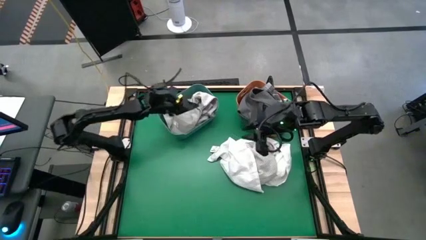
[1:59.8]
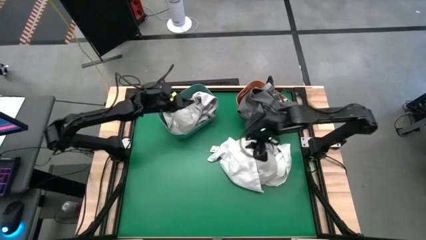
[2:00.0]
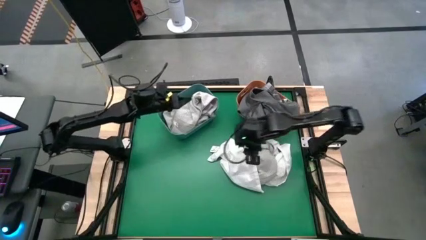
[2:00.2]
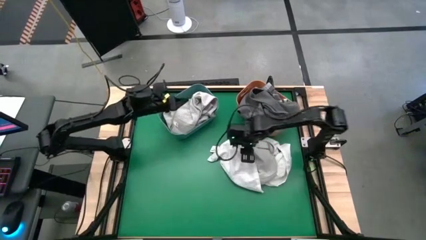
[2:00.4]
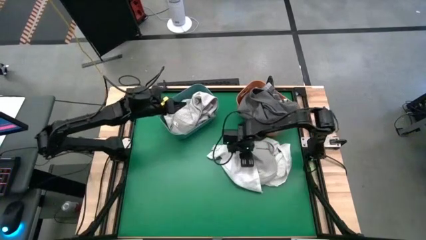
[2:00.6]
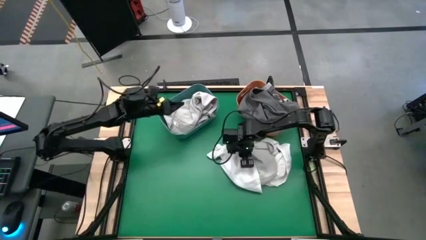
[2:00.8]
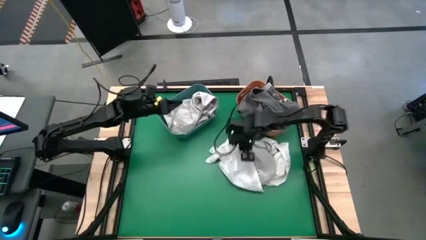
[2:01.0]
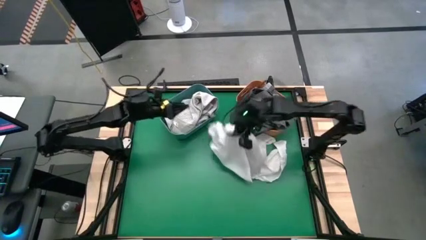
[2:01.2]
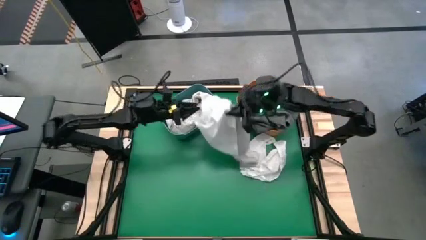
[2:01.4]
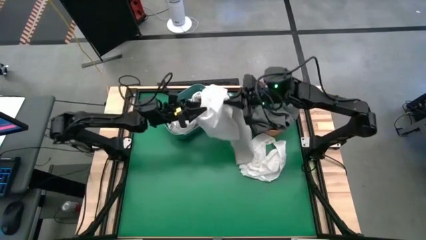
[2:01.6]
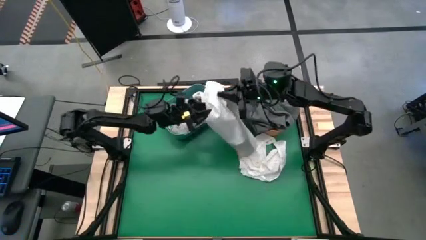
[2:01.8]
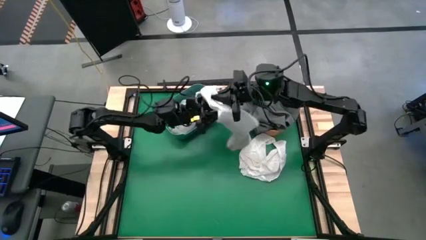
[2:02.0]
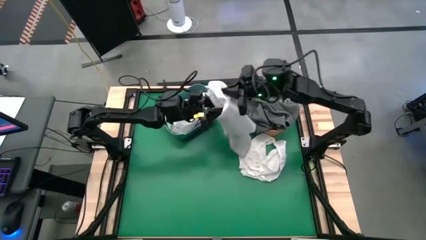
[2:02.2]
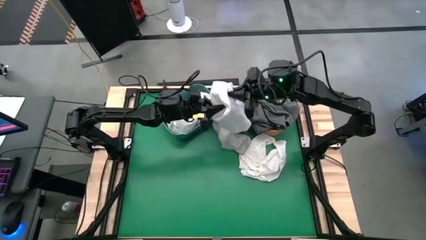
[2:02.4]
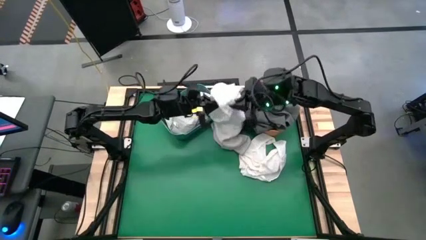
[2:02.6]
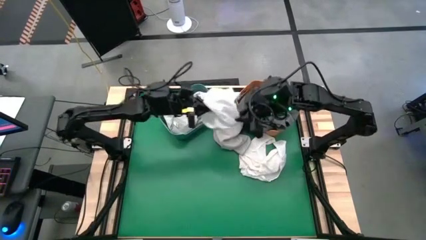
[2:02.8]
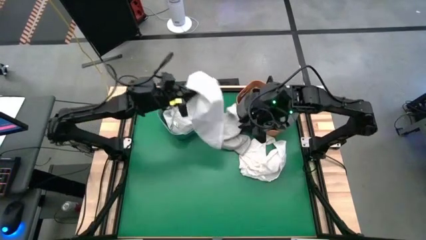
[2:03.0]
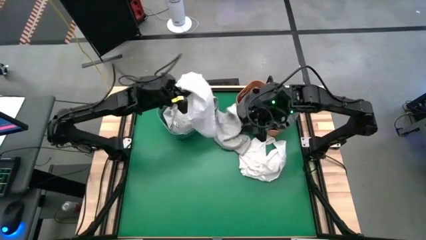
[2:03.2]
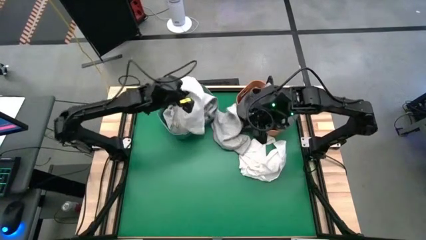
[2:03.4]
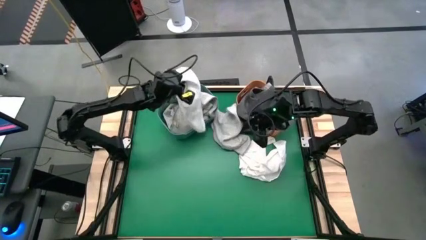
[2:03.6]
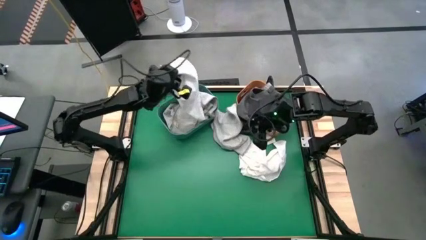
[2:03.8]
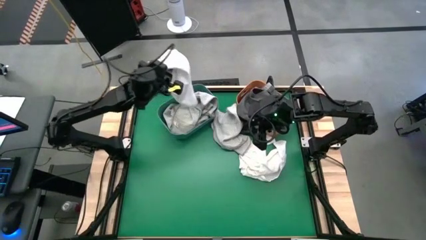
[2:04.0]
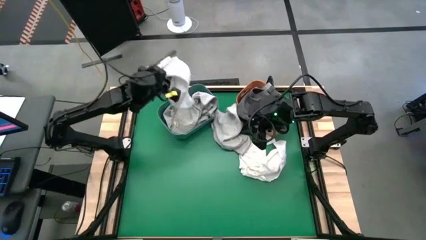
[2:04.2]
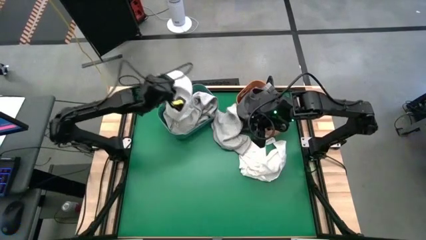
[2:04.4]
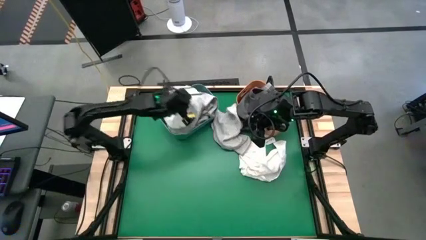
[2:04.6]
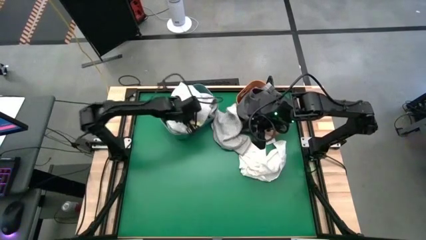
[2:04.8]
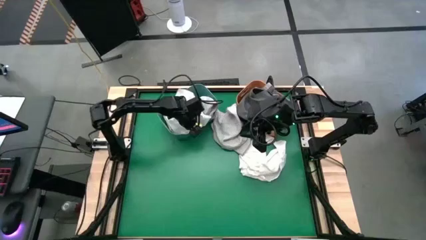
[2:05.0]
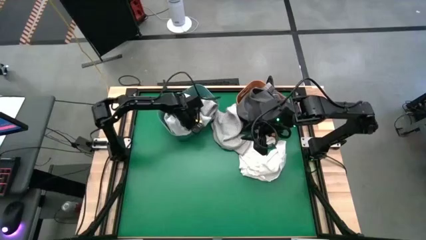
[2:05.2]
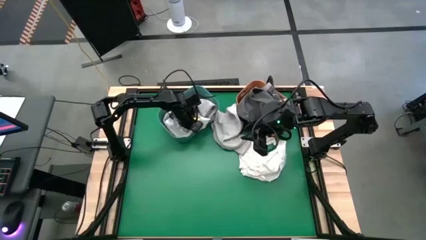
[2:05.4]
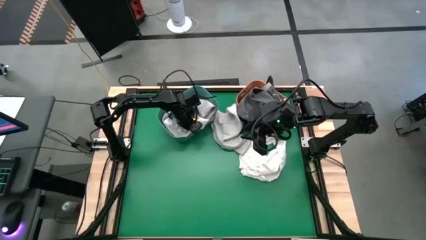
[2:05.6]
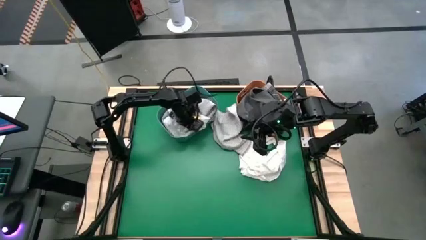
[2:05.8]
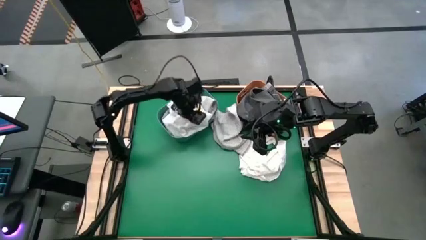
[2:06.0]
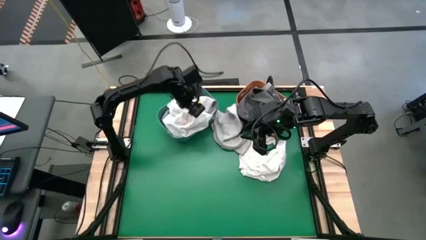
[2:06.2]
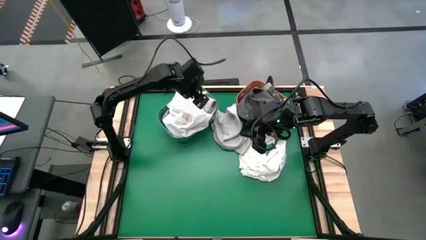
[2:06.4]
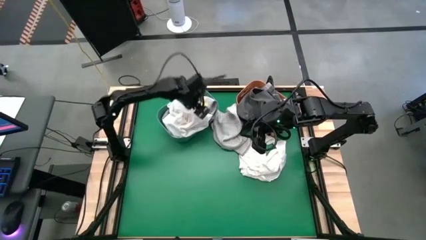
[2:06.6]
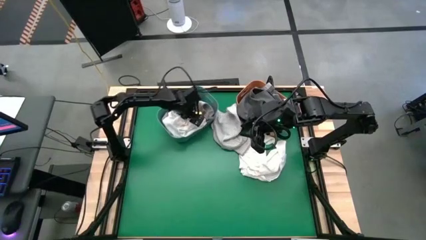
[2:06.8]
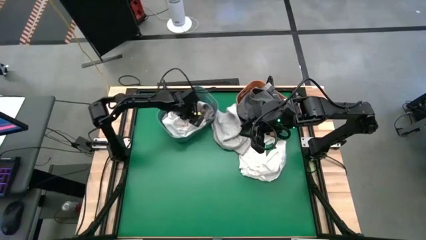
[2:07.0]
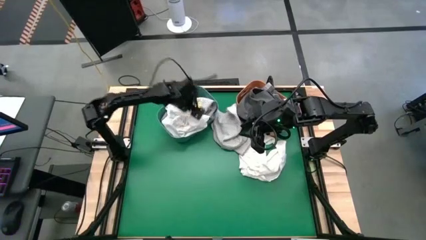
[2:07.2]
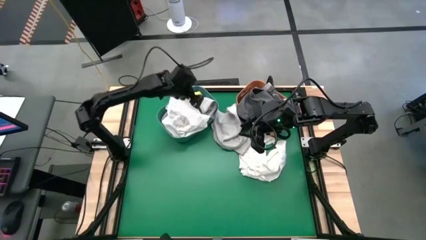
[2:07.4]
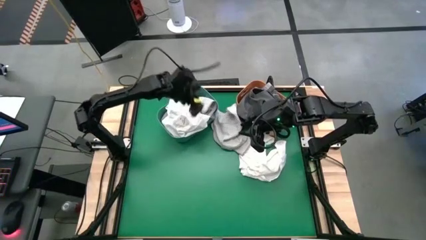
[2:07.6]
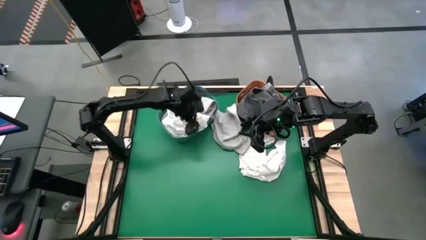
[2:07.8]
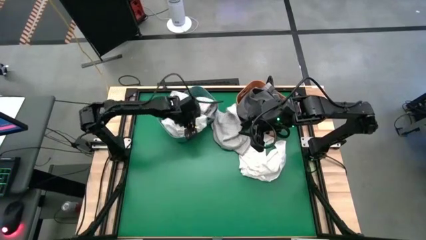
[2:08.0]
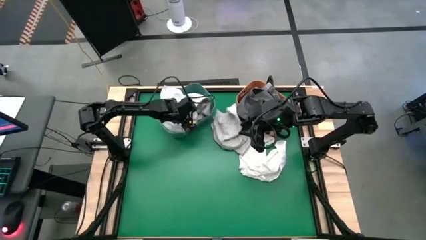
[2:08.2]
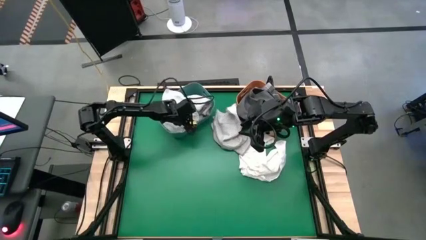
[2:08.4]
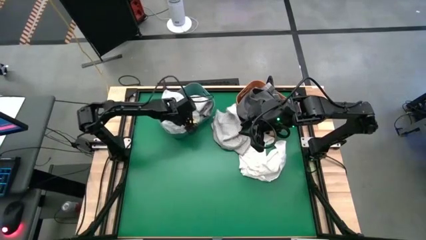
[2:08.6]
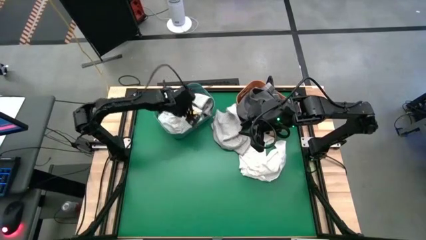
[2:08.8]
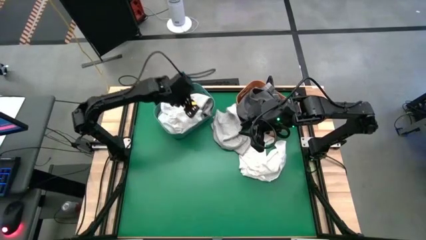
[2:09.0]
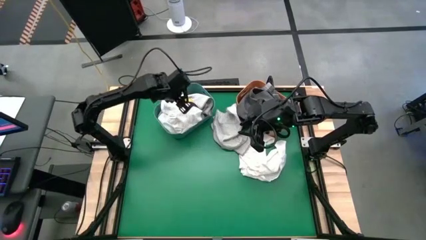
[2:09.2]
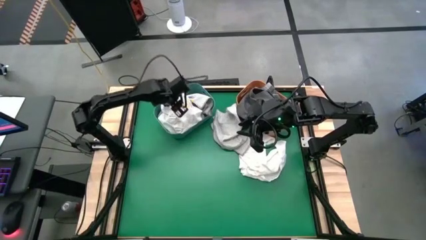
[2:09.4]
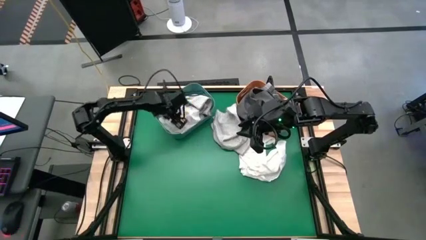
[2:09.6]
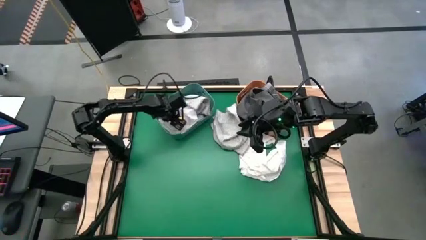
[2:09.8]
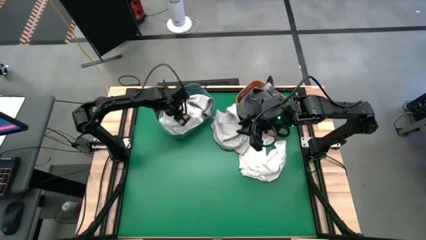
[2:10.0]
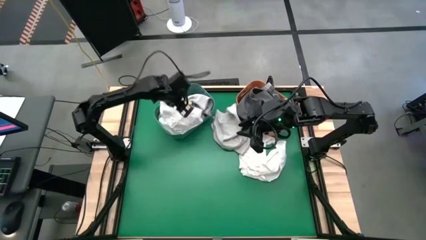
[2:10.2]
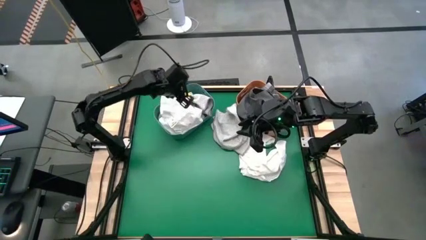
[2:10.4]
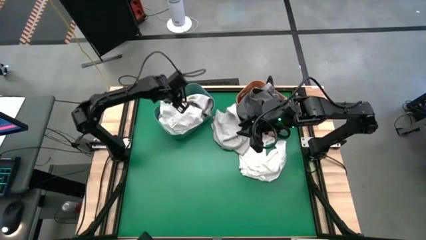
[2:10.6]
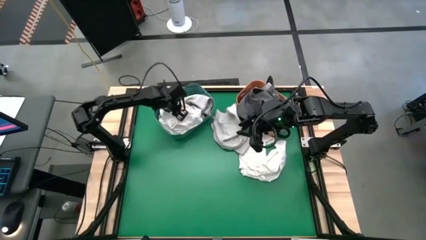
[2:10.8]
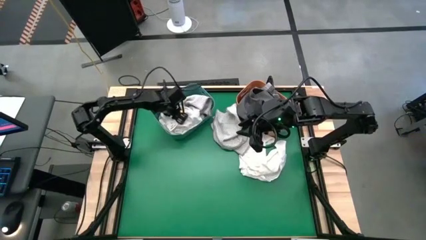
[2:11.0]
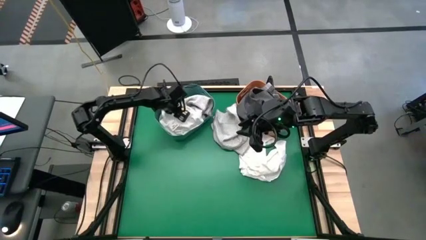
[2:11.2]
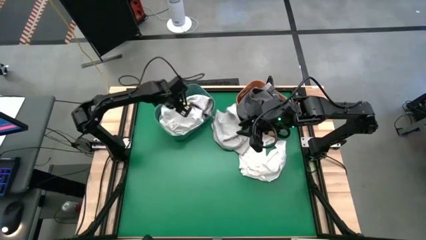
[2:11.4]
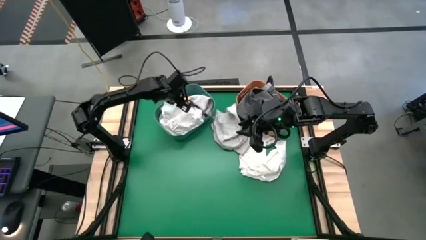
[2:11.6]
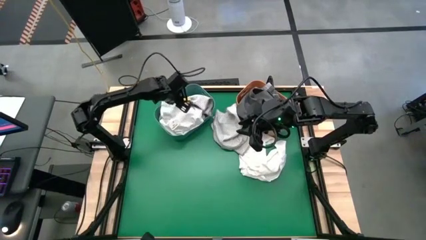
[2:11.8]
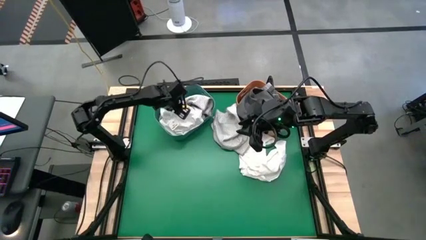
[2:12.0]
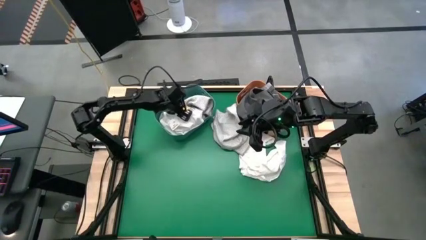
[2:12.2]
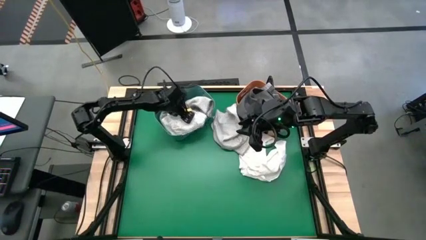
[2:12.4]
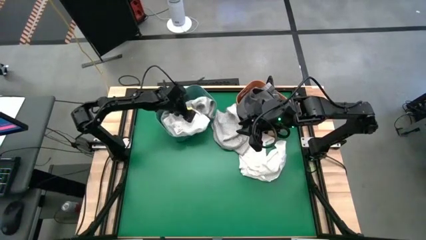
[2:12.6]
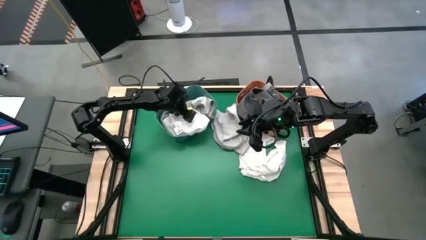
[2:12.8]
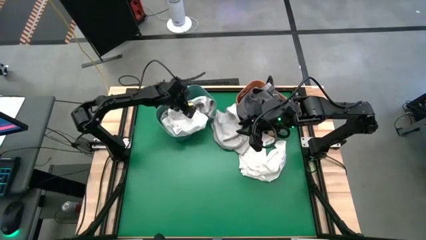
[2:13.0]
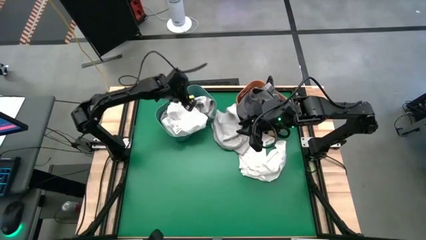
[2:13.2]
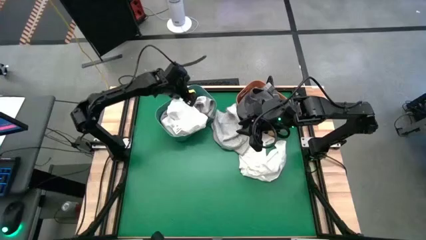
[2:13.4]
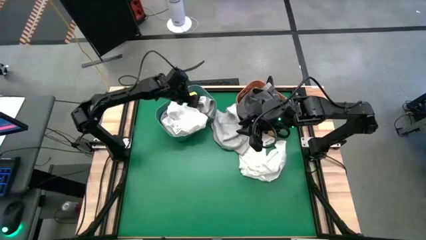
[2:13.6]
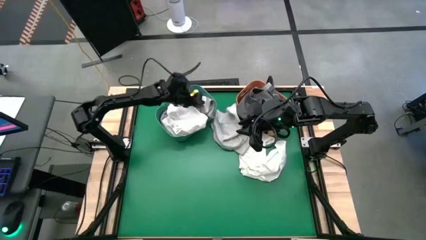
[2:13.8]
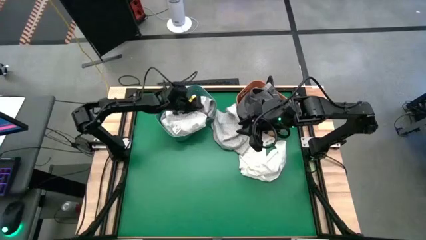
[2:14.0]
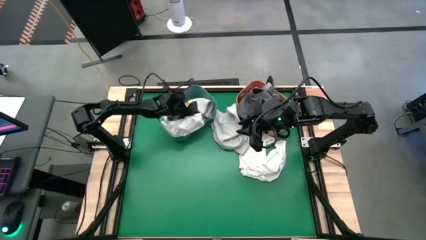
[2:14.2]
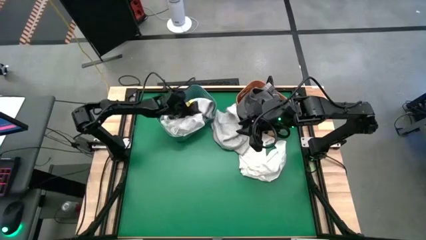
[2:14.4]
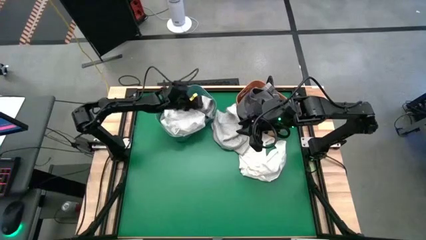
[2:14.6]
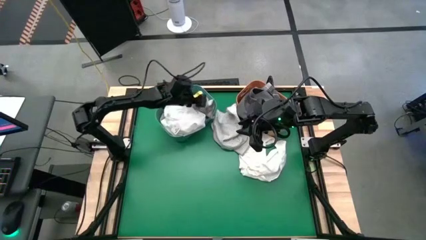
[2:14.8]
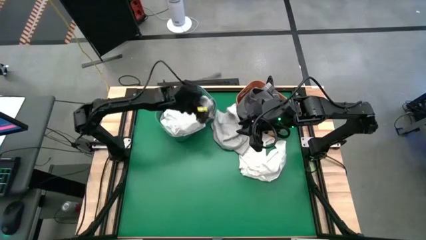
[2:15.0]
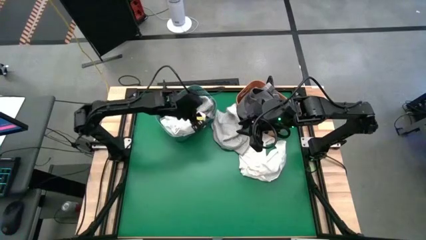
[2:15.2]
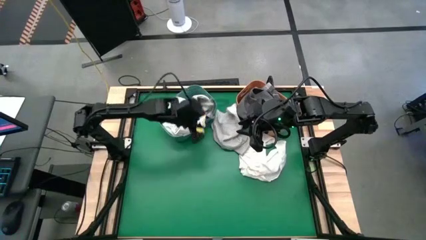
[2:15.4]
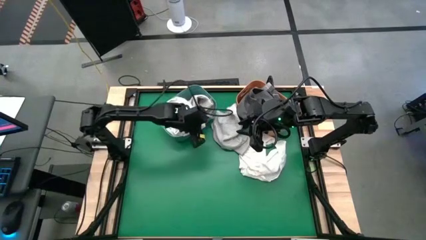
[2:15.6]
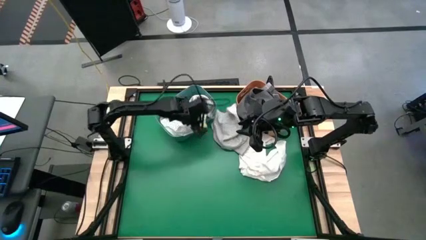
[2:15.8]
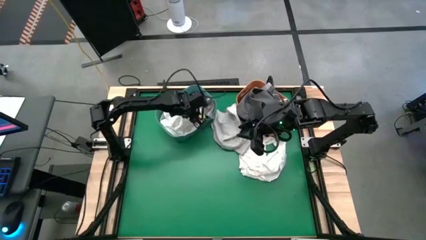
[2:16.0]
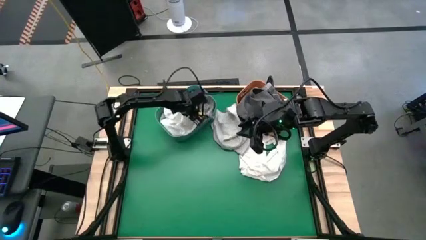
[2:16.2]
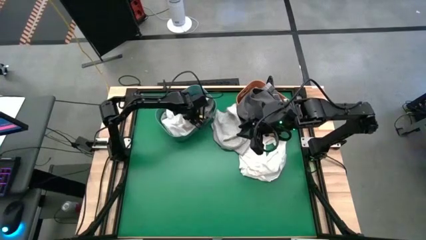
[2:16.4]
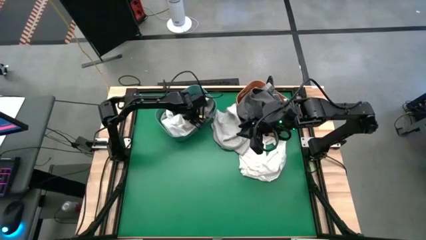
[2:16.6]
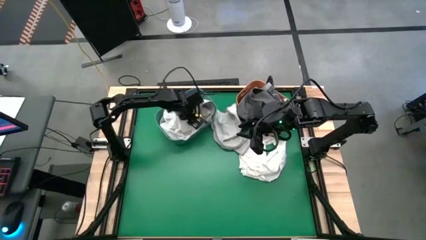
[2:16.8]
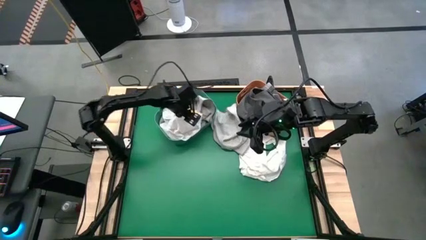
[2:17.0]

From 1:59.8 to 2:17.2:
Task: Sort towels by color in basket
Put the white towel into the blue bin
